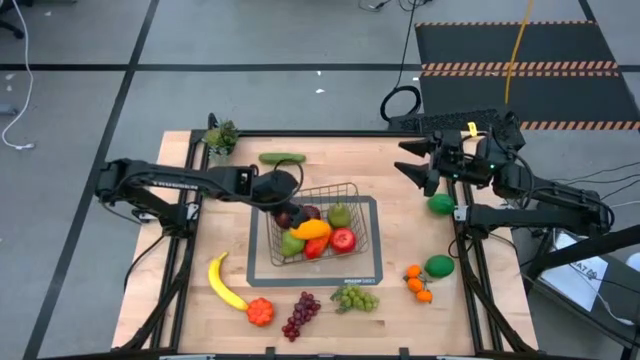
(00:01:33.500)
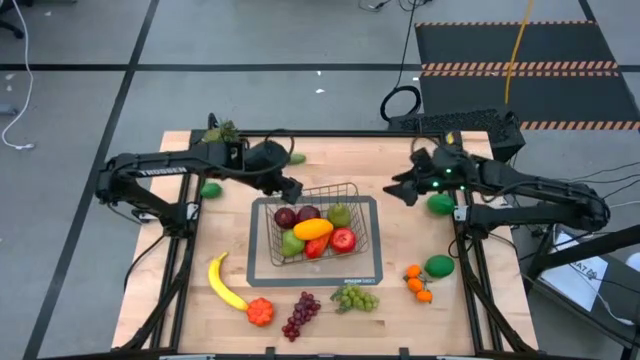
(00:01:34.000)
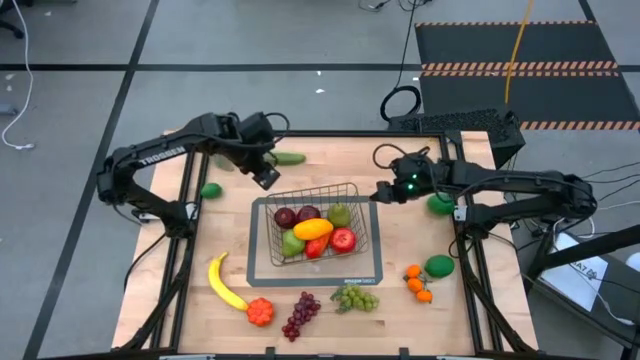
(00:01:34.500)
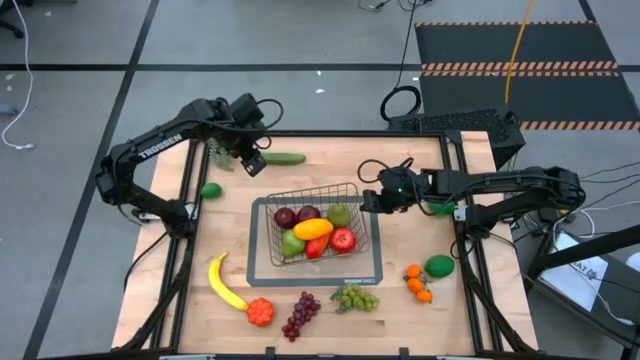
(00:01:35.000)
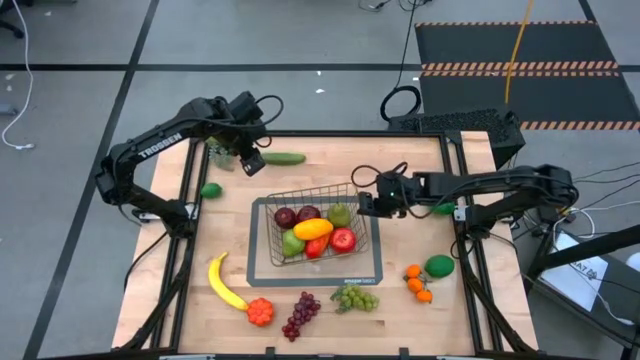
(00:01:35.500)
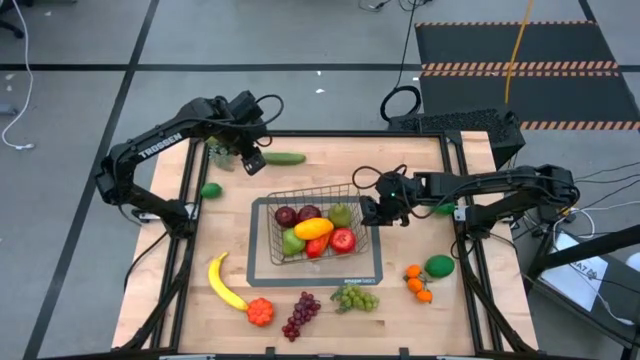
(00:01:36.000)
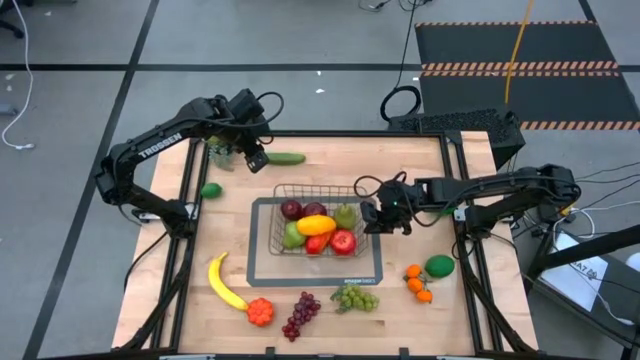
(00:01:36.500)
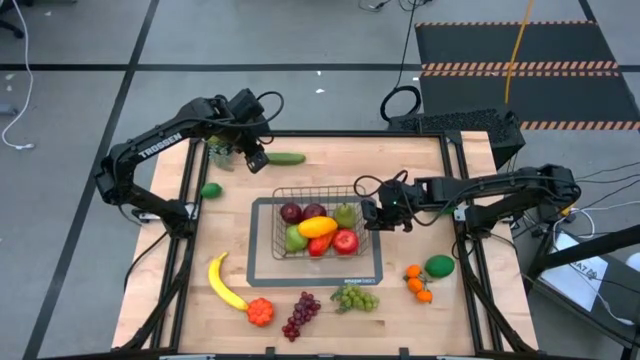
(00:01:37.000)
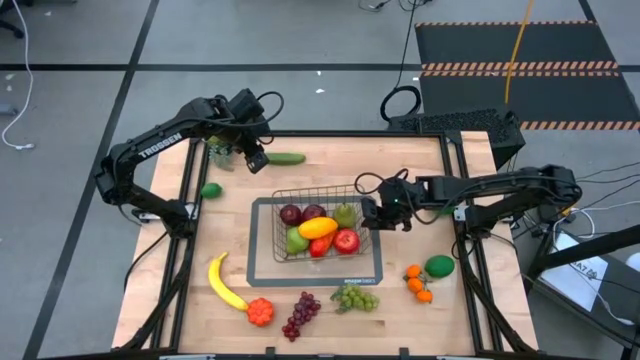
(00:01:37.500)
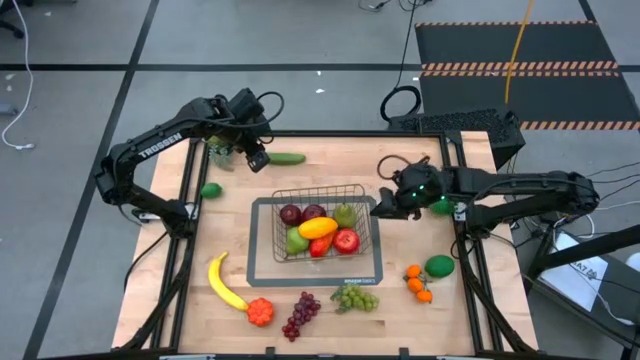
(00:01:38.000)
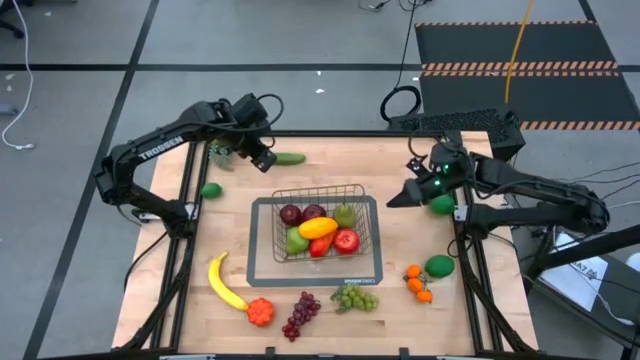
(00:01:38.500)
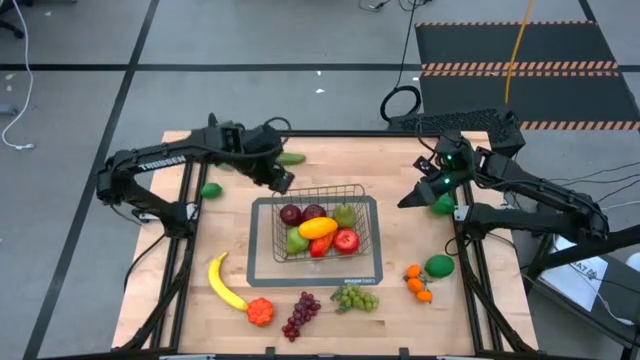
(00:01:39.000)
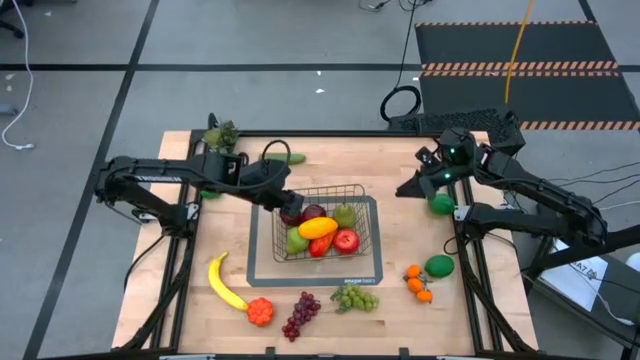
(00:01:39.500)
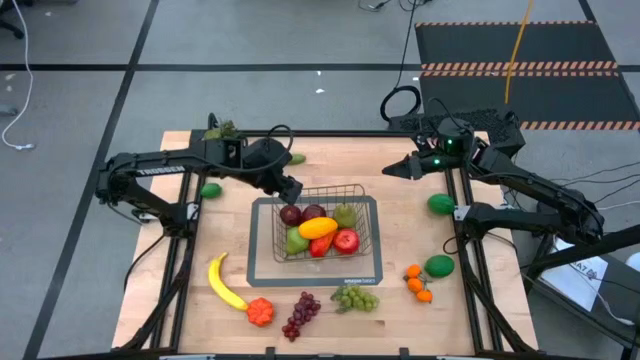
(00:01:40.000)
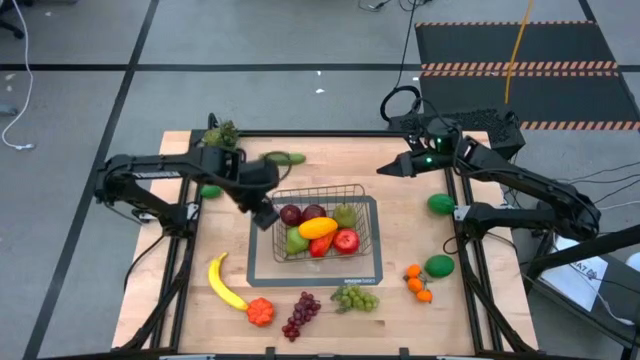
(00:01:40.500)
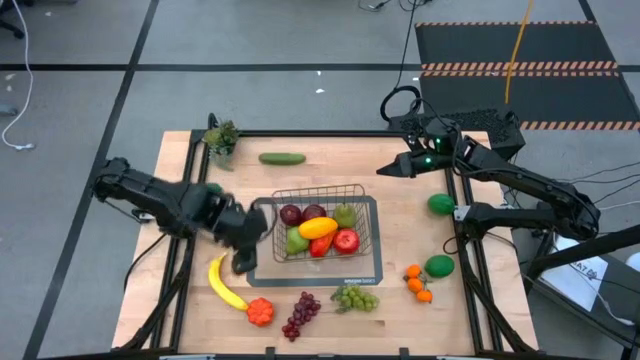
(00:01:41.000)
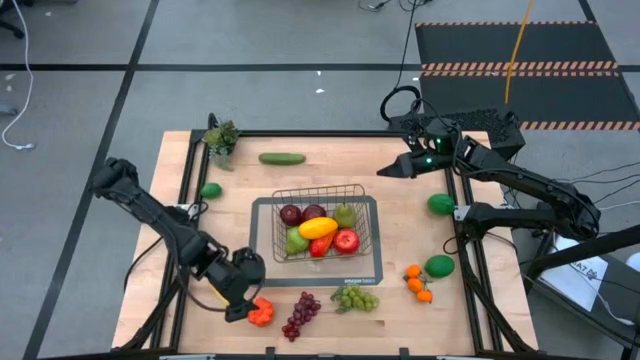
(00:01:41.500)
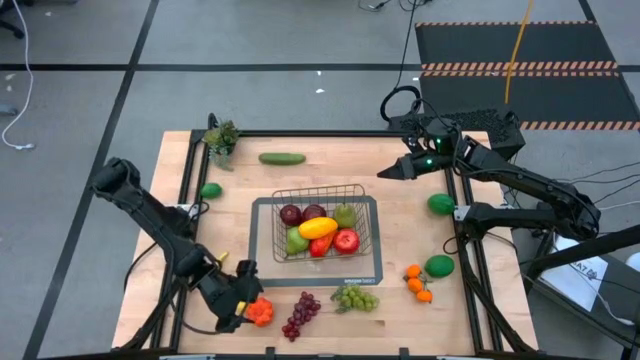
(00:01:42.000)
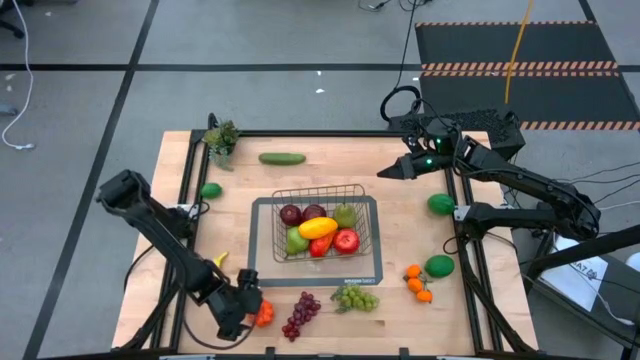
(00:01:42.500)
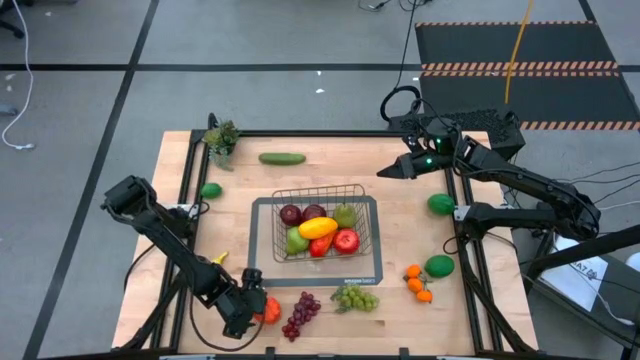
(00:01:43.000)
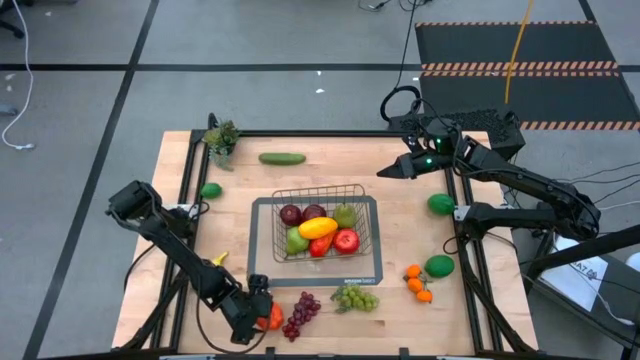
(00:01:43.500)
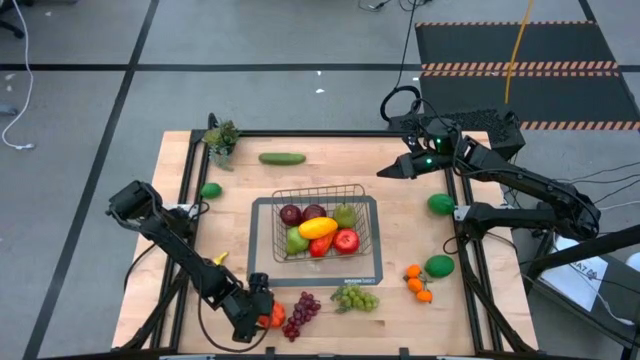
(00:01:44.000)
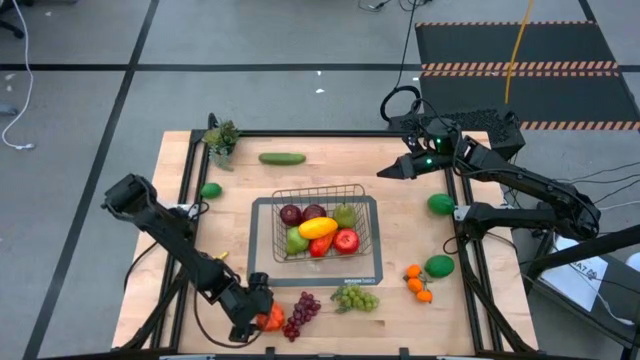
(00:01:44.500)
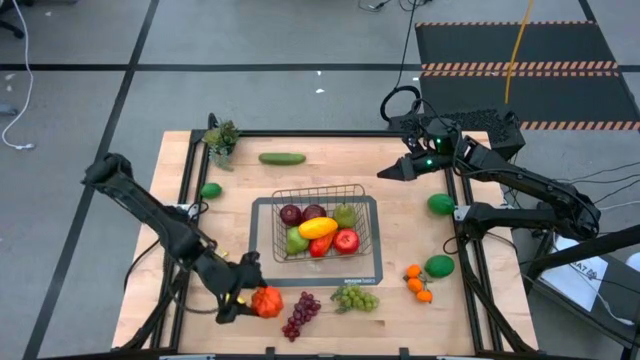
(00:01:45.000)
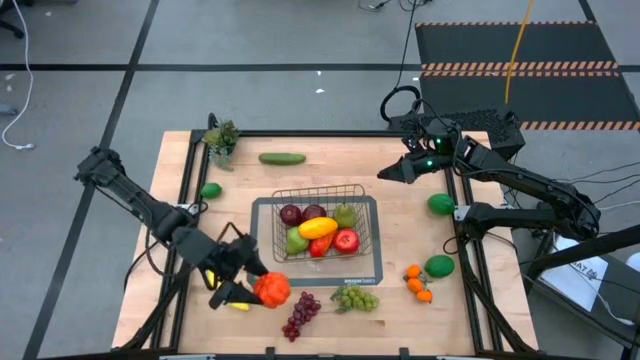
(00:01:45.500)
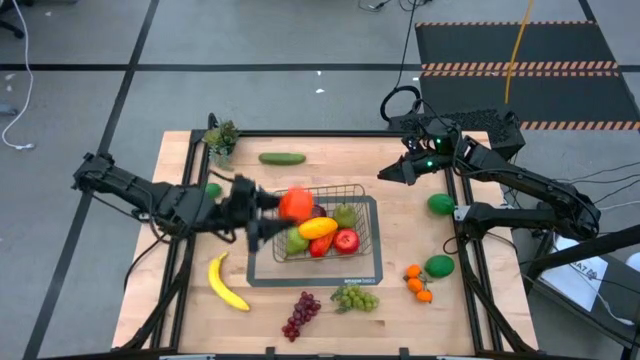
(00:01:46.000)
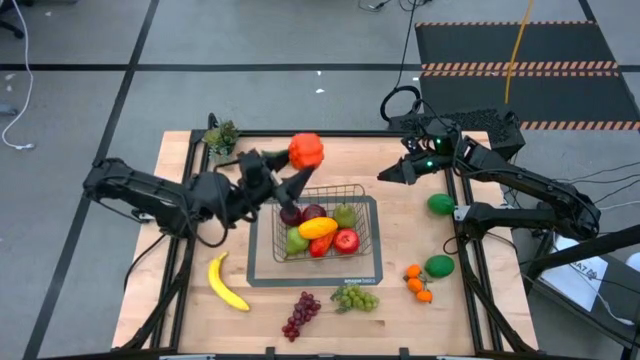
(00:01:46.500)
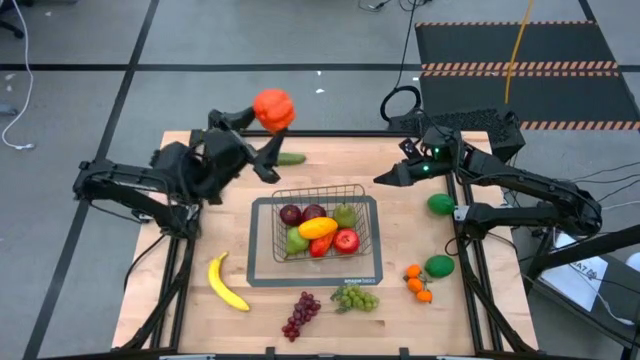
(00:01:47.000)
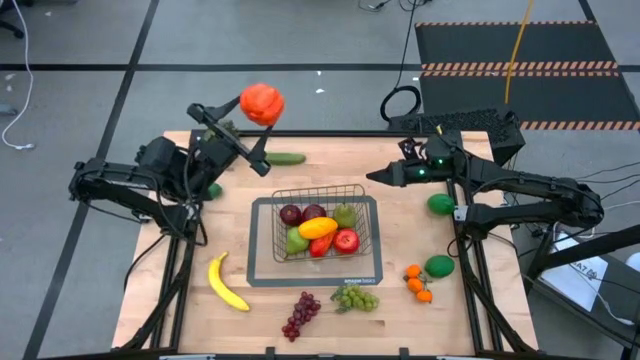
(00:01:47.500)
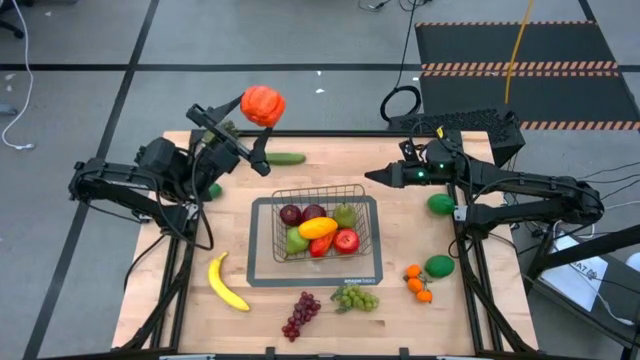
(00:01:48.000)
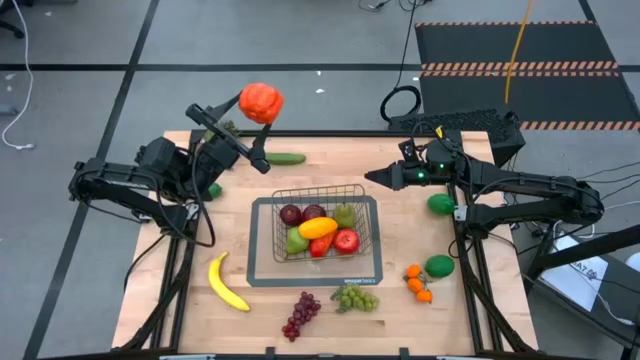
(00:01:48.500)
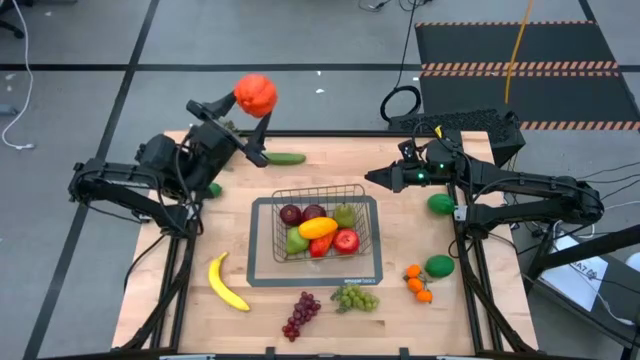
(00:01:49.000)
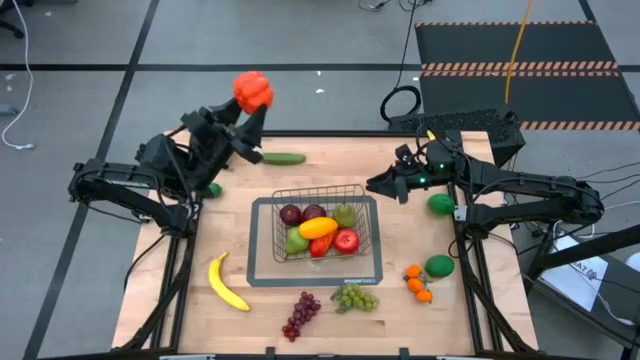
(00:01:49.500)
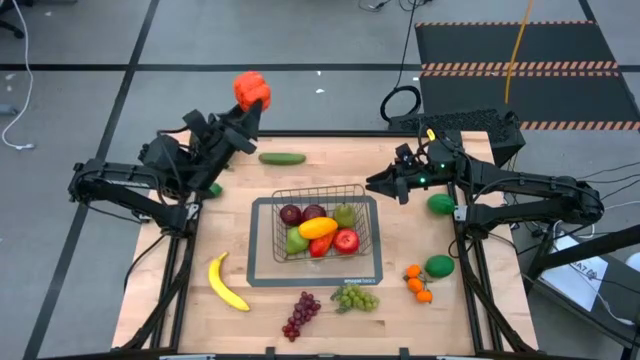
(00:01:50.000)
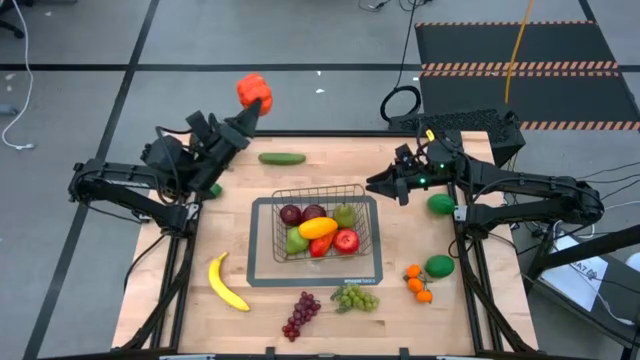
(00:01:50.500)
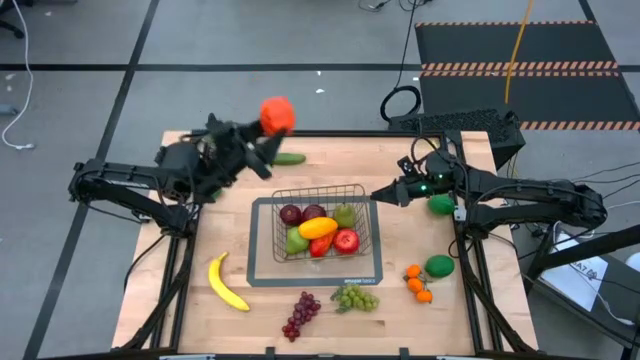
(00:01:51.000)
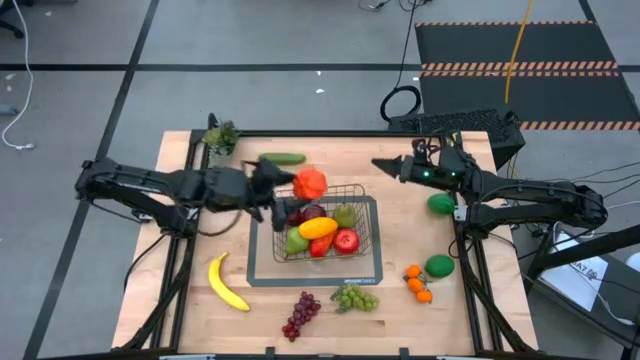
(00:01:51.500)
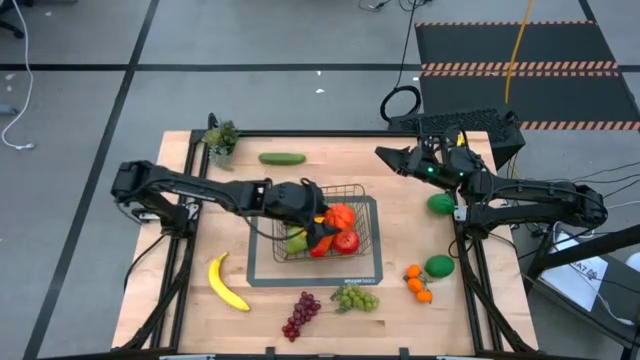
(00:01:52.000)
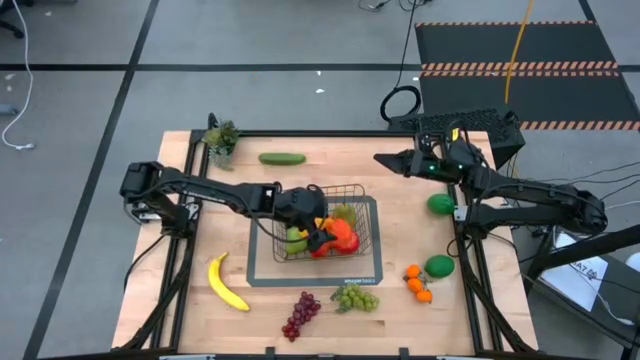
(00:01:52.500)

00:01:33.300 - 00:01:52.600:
Task: Build produce basket
Put the orange squash into the gold wire basket
